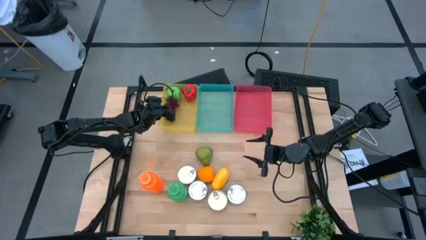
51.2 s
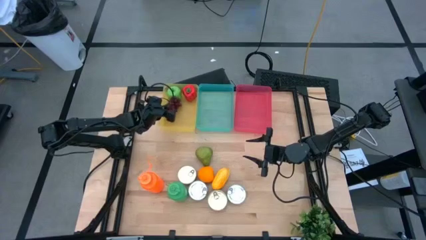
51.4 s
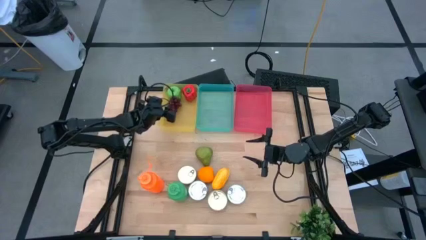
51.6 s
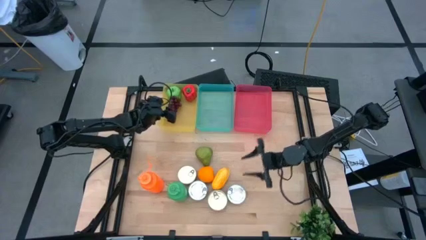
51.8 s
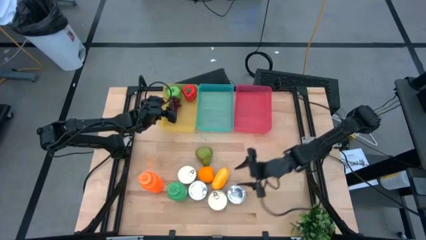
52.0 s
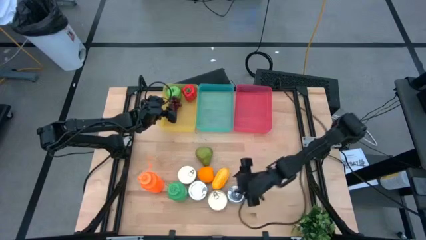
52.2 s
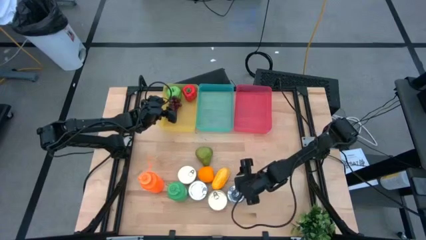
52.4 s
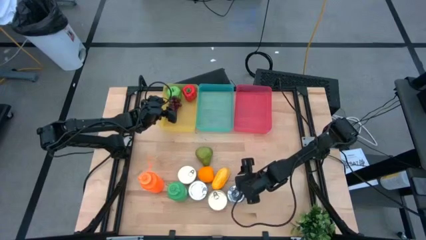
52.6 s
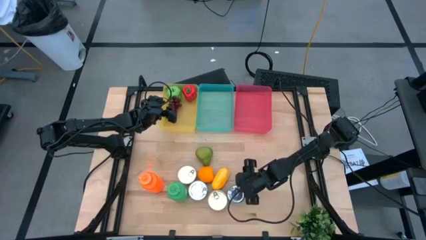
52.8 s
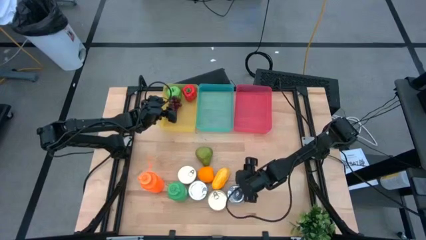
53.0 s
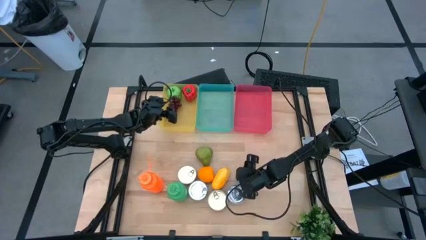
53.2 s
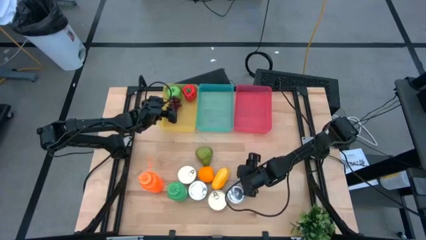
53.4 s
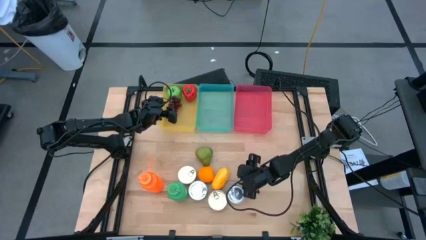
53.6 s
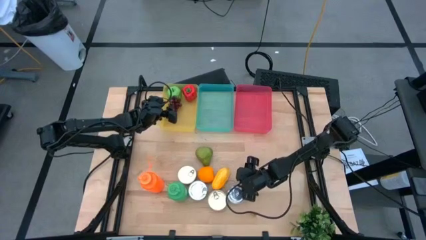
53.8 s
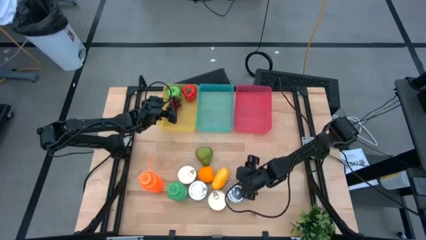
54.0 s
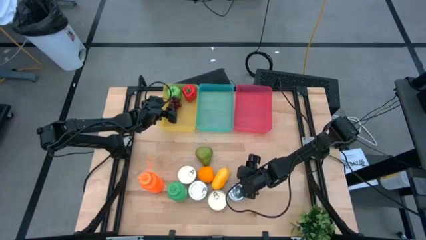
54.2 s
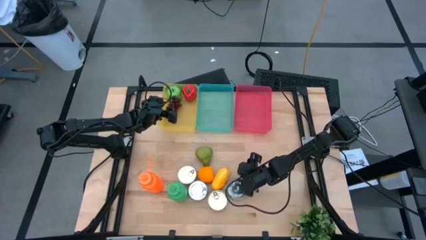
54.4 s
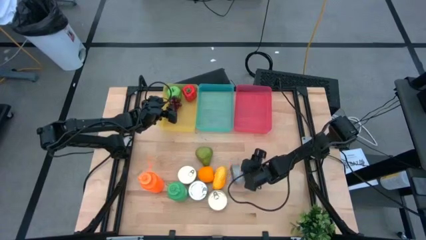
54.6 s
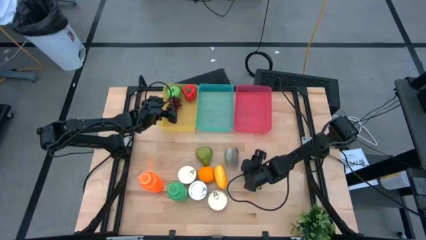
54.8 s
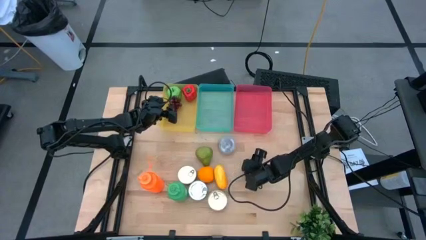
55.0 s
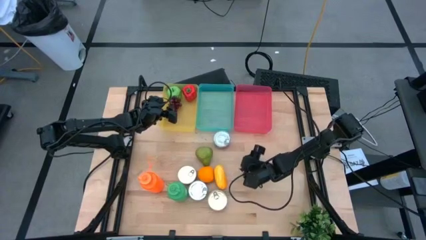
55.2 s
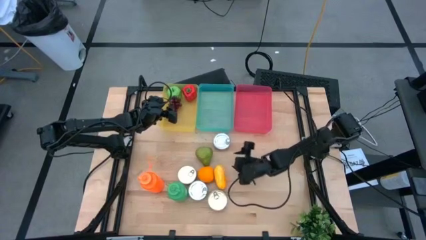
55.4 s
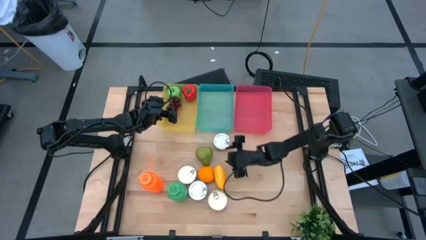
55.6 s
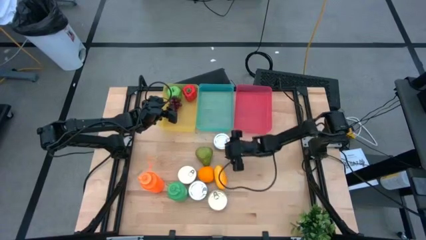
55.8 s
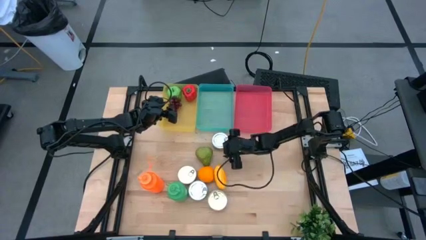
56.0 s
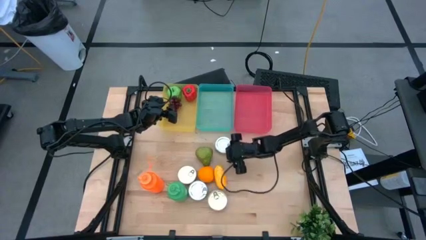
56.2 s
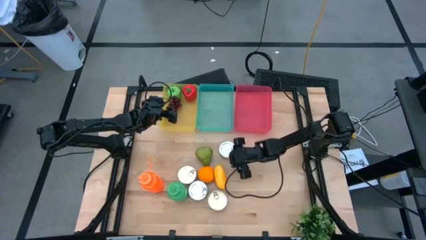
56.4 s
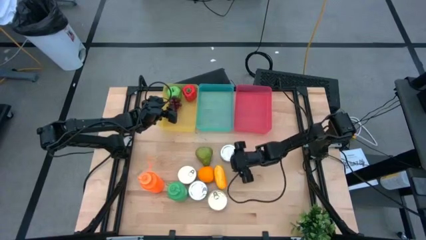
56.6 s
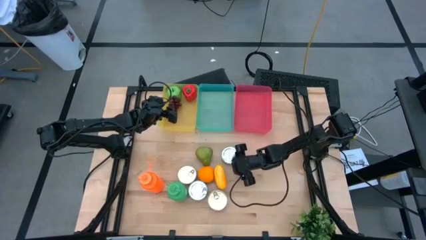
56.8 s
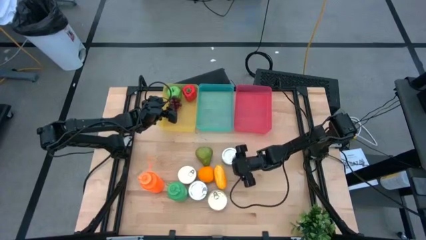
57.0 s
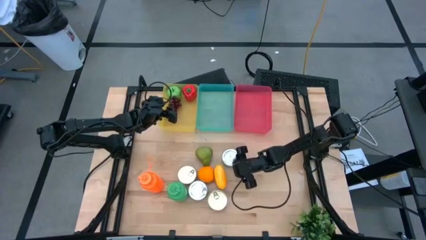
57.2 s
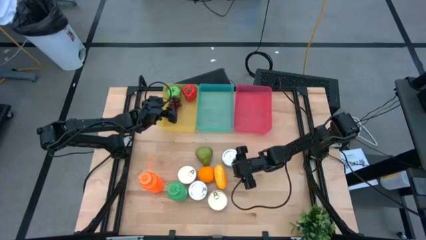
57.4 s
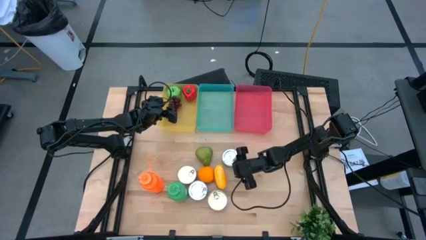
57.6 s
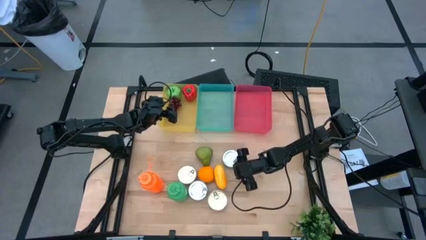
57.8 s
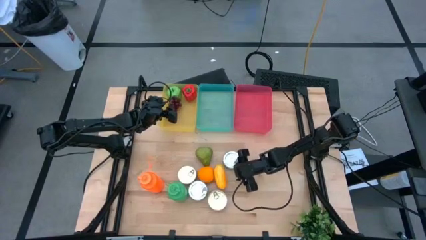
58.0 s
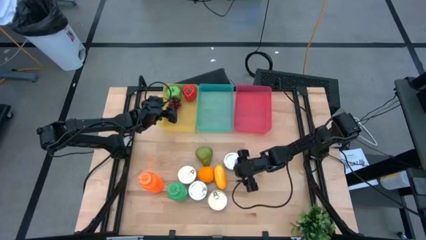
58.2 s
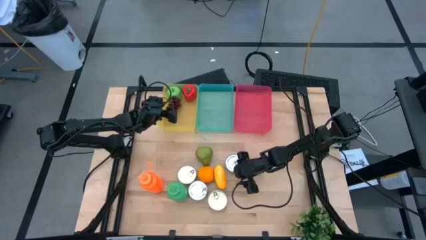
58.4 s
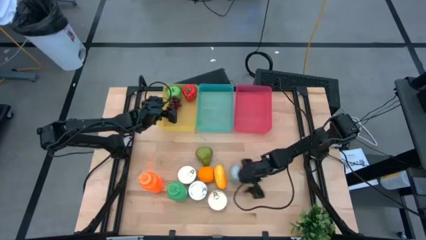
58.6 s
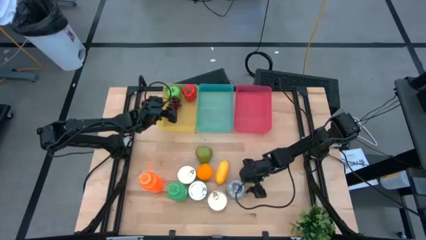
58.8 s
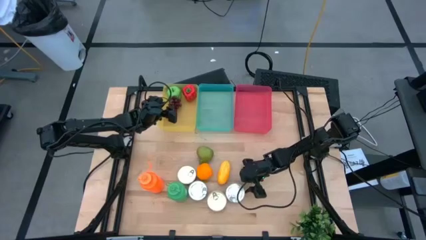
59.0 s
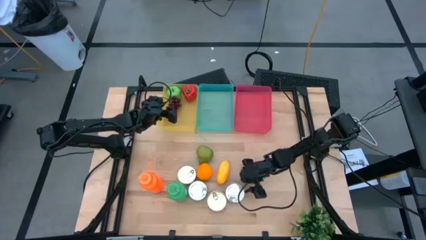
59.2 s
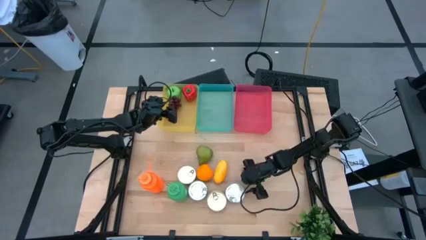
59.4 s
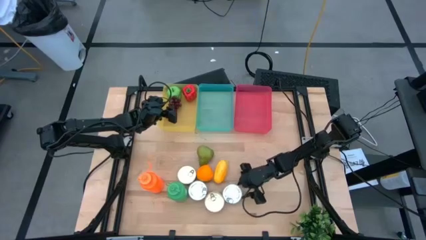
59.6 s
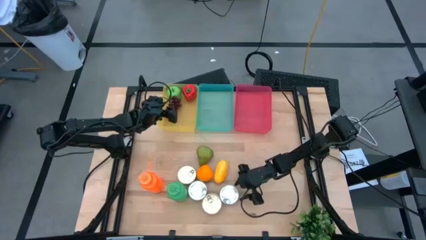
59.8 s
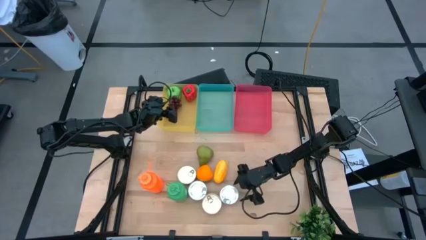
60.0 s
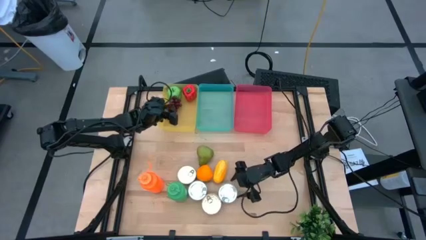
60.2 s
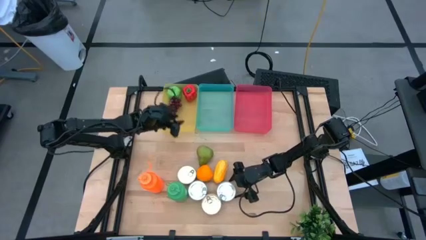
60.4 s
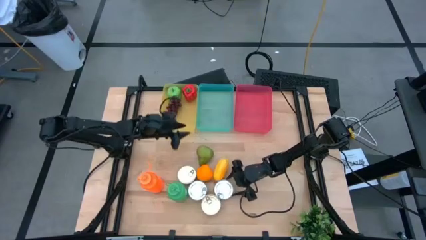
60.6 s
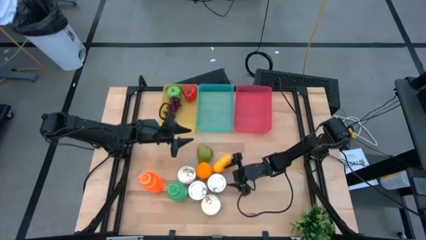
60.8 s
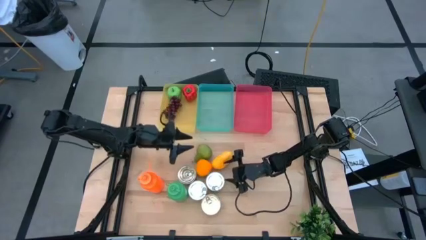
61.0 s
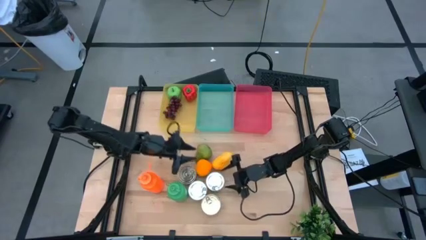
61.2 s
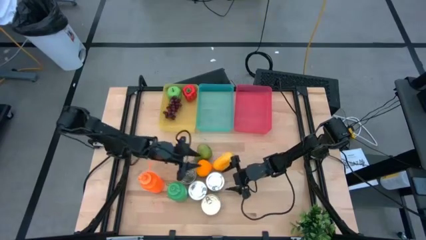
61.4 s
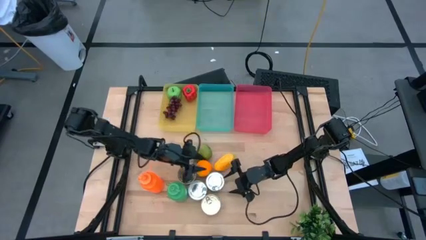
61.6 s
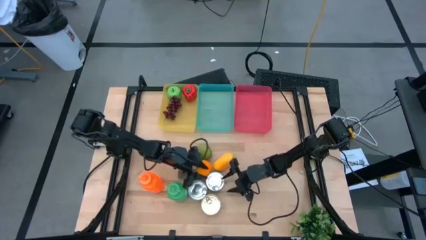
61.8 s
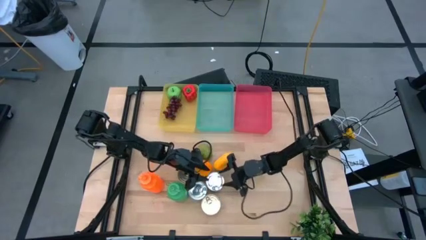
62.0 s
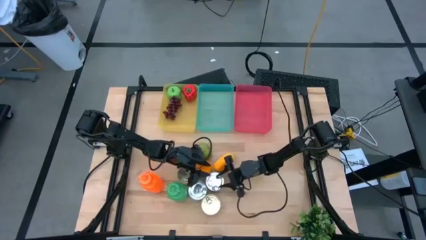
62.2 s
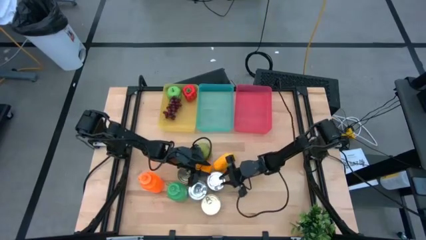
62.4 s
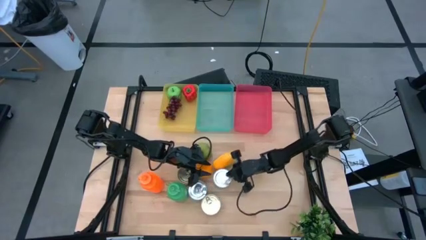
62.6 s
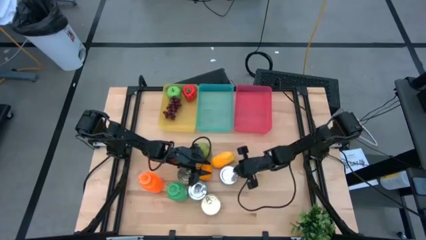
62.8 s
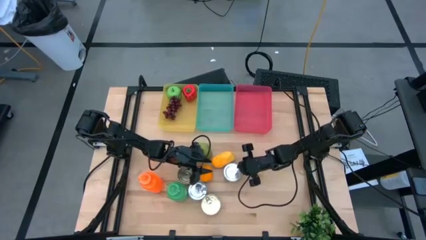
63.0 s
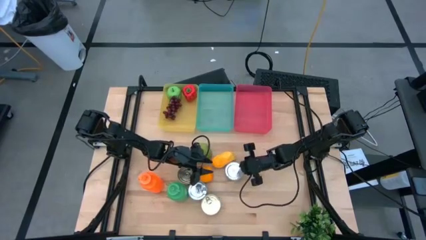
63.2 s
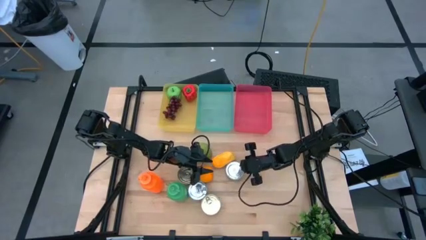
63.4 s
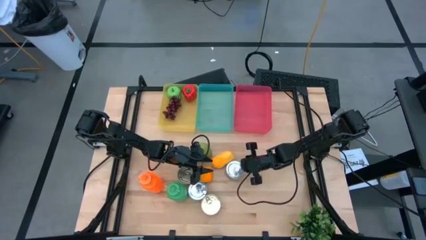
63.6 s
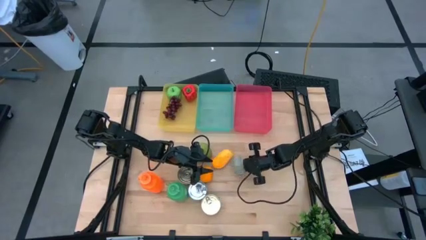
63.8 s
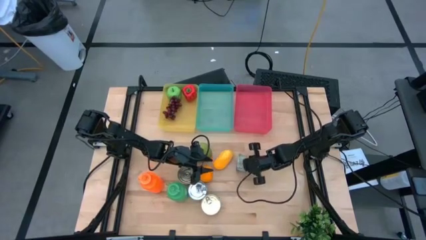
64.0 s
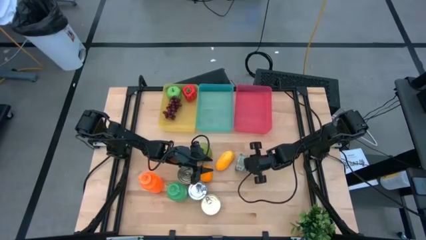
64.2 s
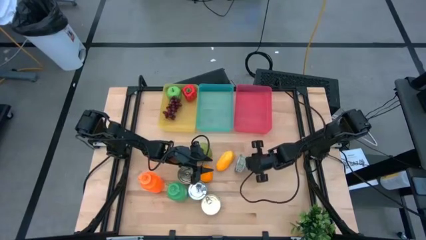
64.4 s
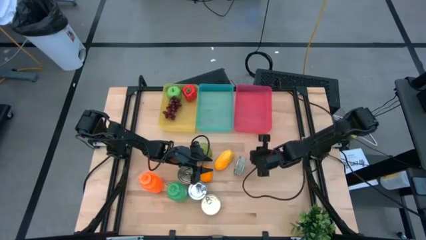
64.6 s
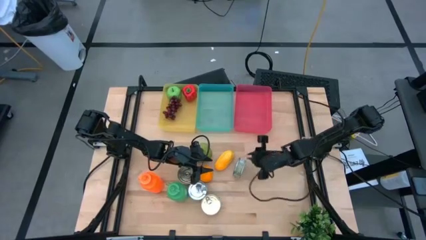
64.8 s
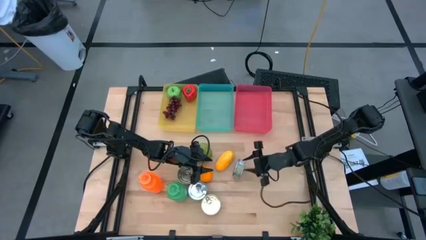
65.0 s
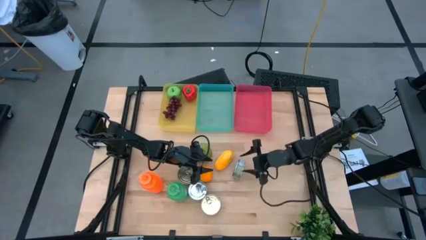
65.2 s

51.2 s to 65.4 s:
Task: Pick & Place Food Item
Put the right green tuna can into the red bin

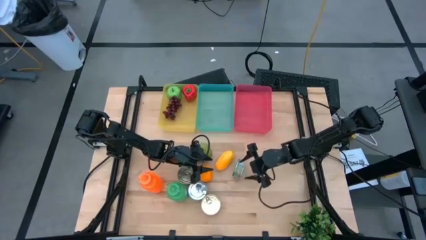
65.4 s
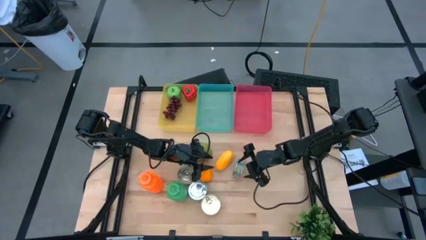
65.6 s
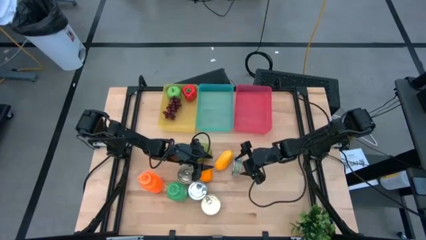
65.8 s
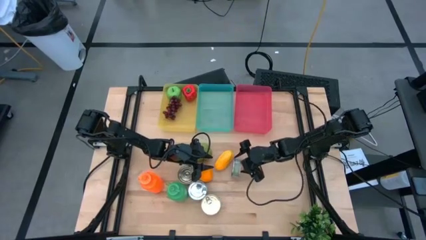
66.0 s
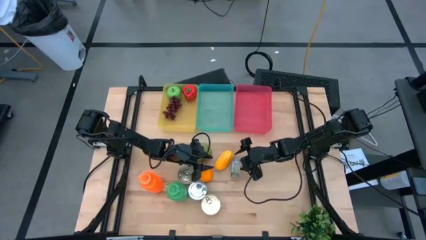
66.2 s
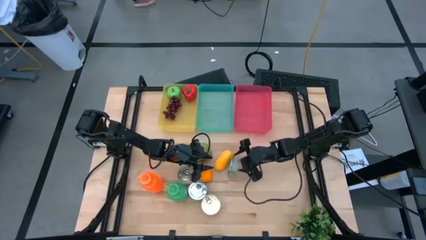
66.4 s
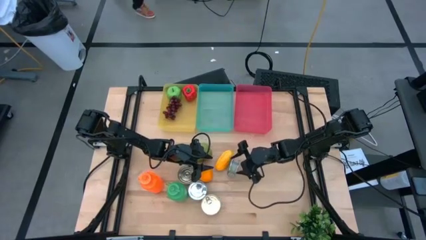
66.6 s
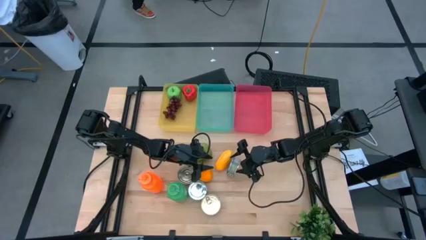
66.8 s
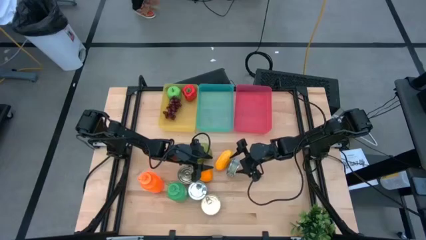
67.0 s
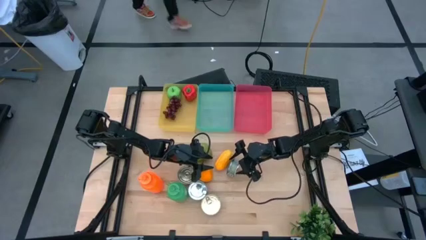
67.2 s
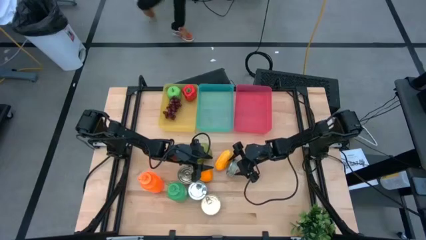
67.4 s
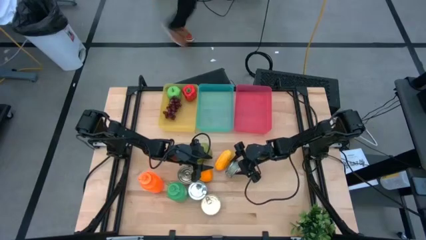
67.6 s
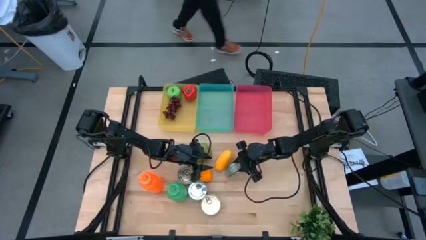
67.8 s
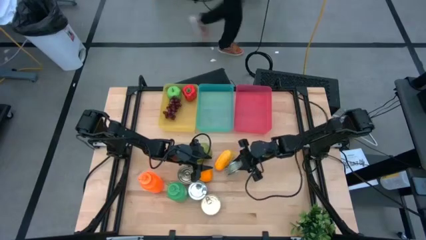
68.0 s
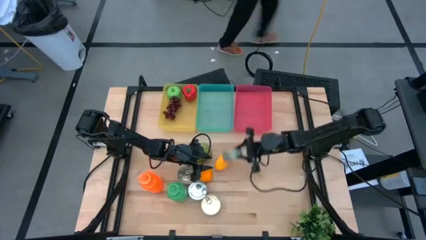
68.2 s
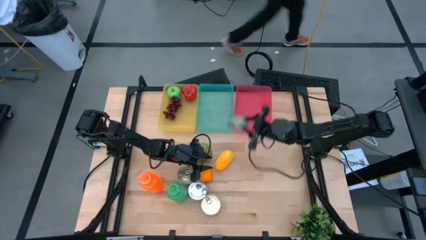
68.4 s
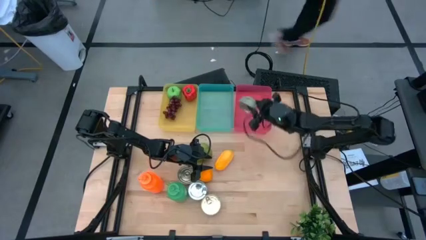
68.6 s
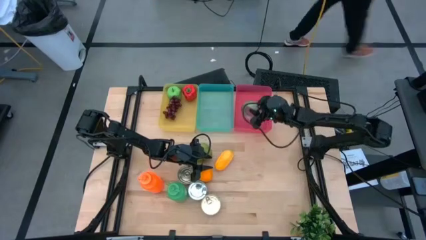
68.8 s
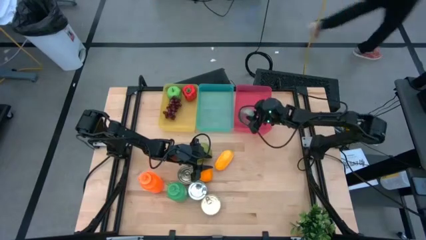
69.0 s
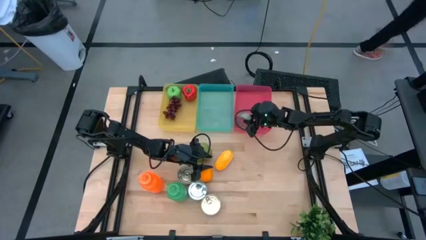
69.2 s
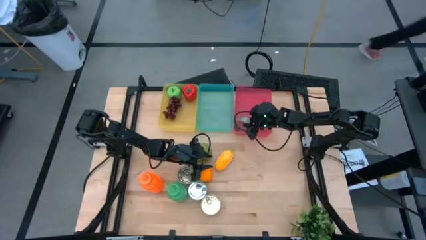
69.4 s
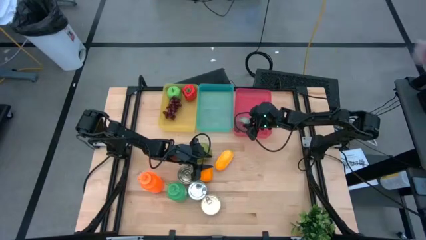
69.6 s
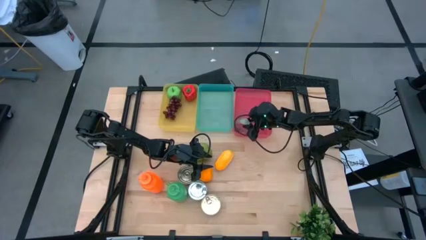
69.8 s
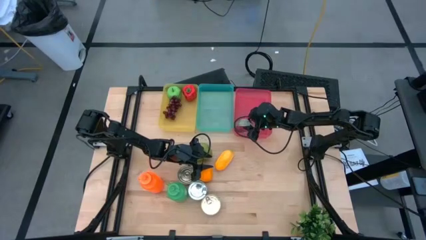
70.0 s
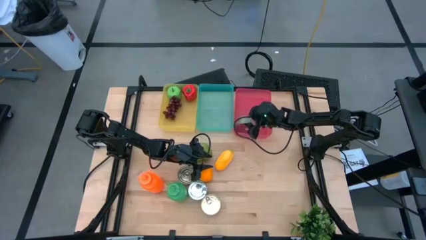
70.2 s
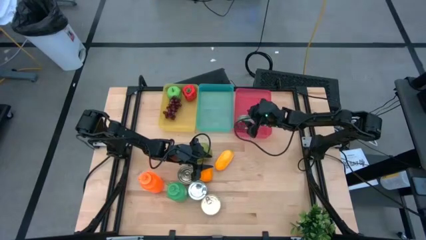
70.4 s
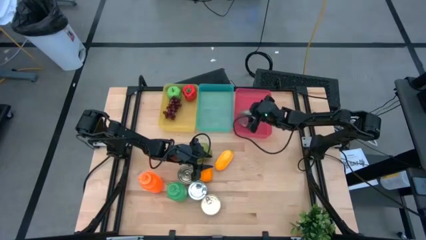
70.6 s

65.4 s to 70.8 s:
Put the right green tuna can into the red bin
